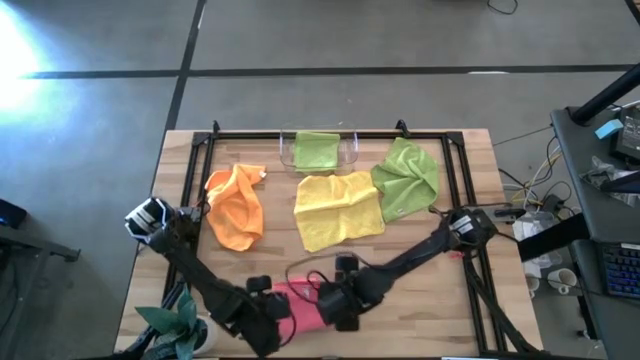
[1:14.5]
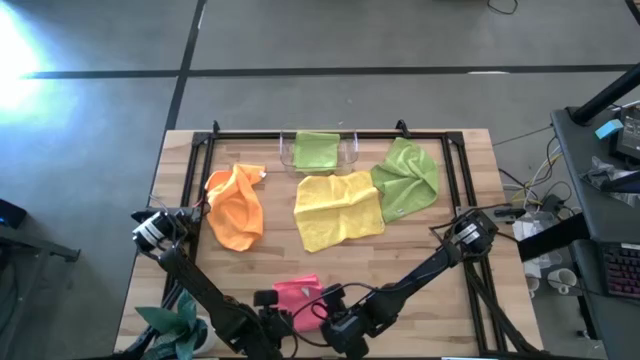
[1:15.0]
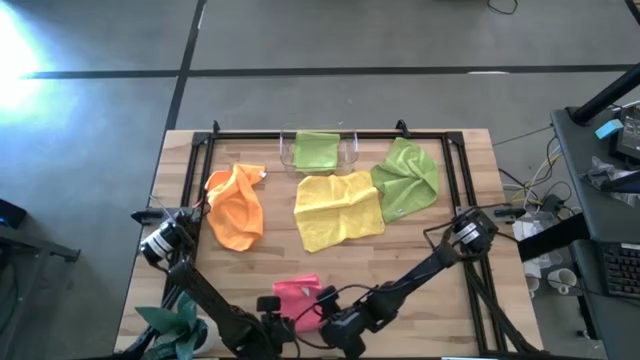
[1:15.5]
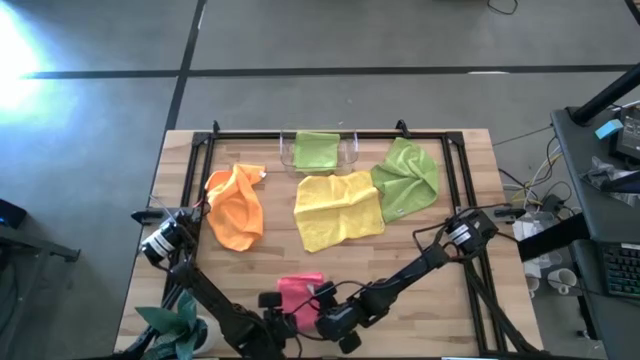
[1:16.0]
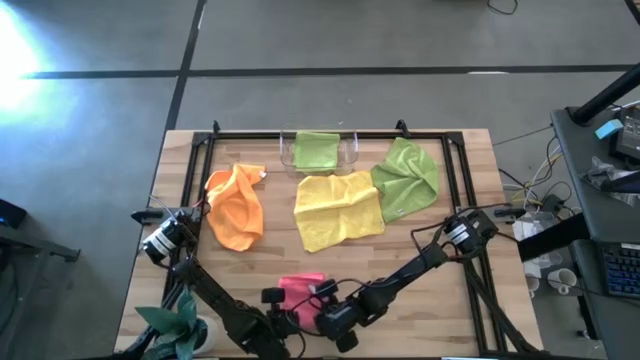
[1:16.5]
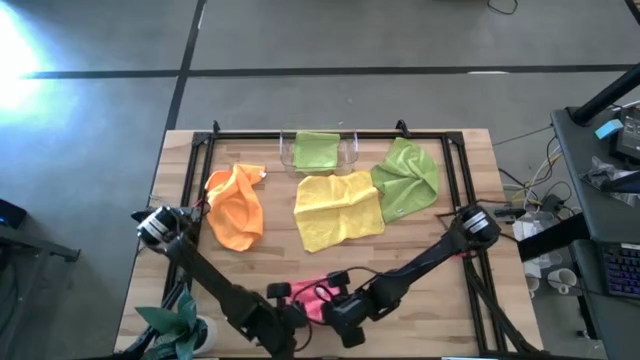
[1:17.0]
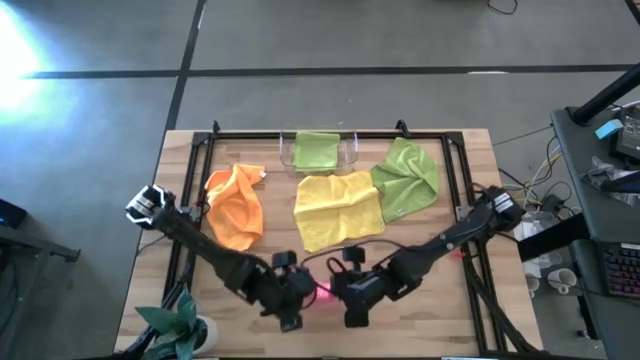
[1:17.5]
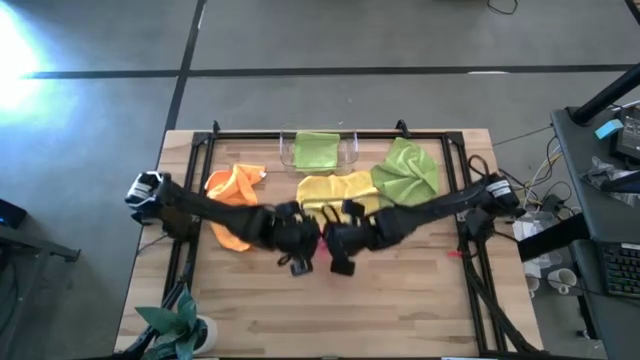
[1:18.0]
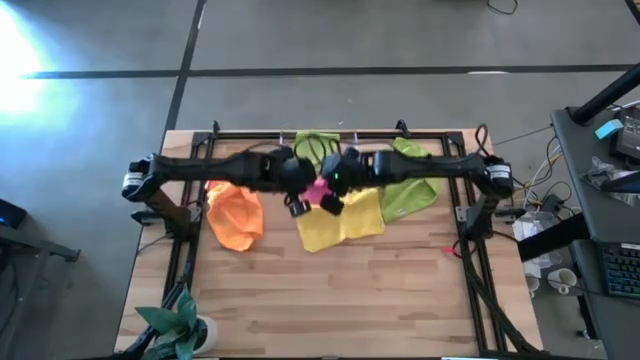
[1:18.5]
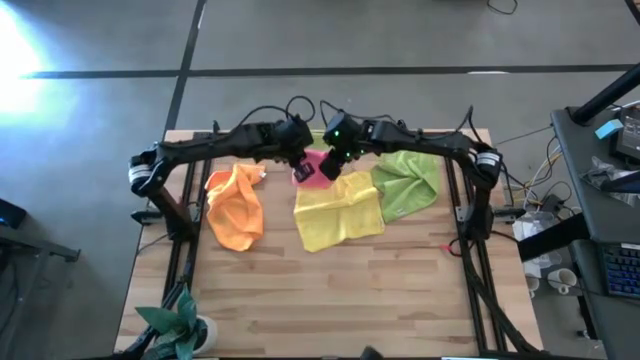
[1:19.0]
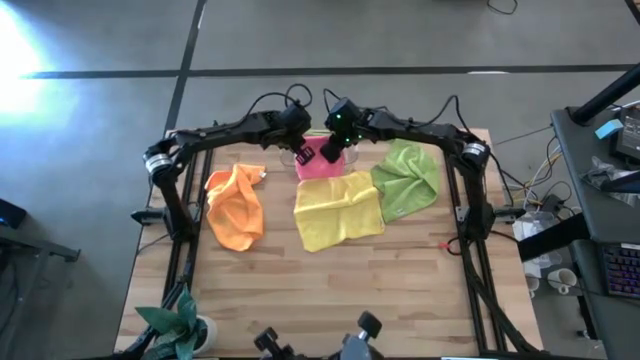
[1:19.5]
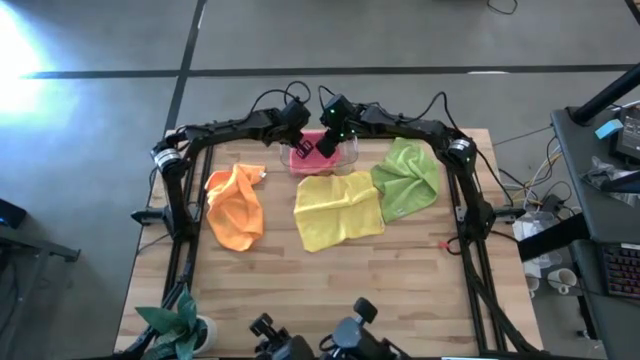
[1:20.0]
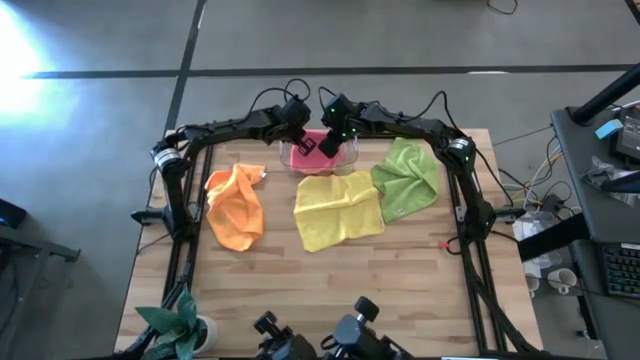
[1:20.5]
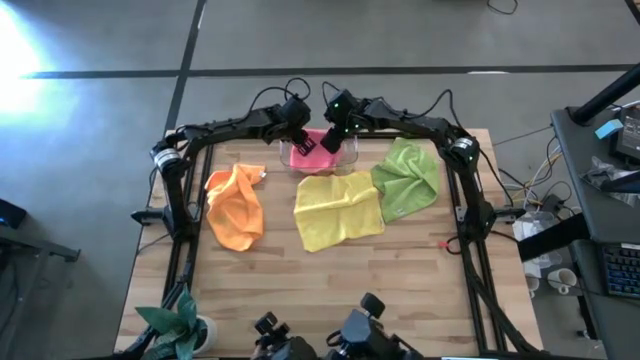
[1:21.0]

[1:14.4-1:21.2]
Task: Fold microfiber towels
Put the folded pink microfiber cloth into the transparent bin

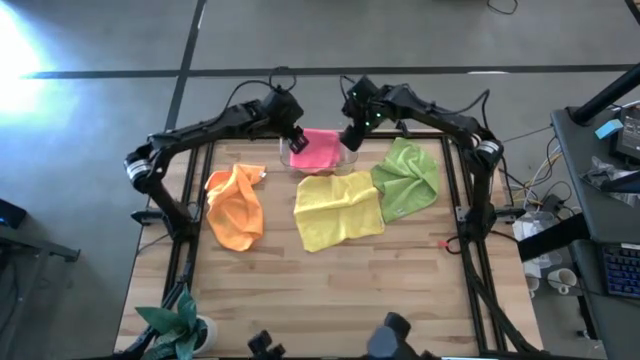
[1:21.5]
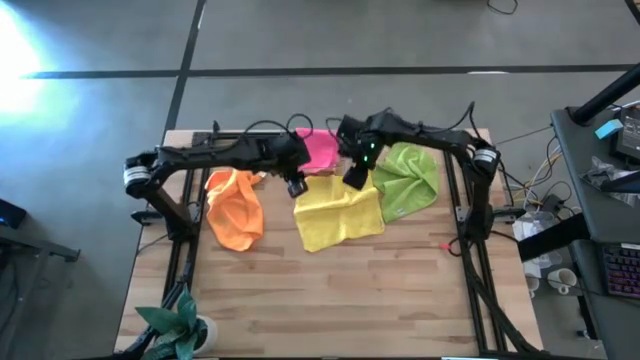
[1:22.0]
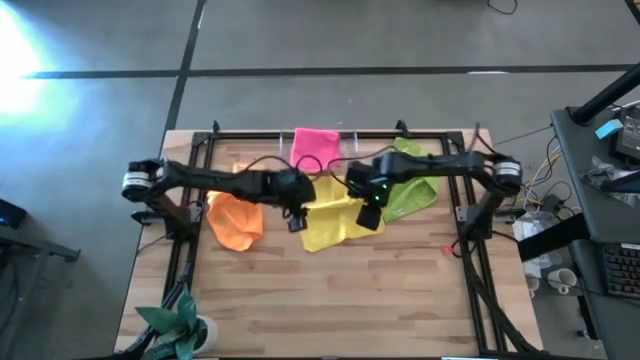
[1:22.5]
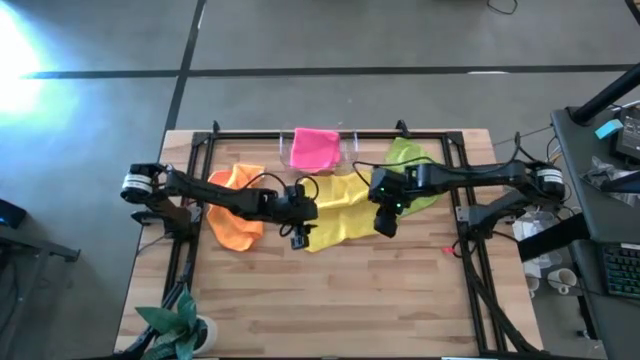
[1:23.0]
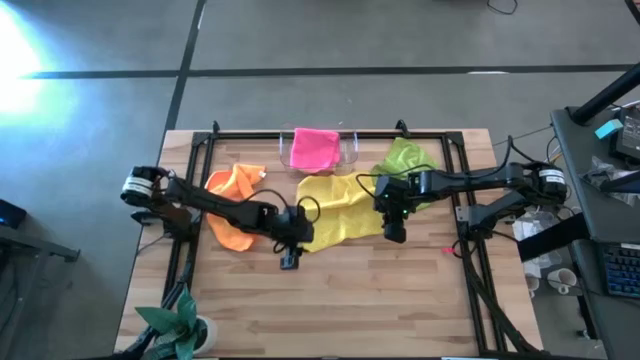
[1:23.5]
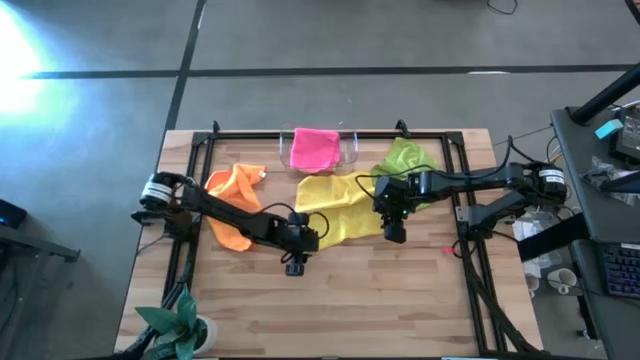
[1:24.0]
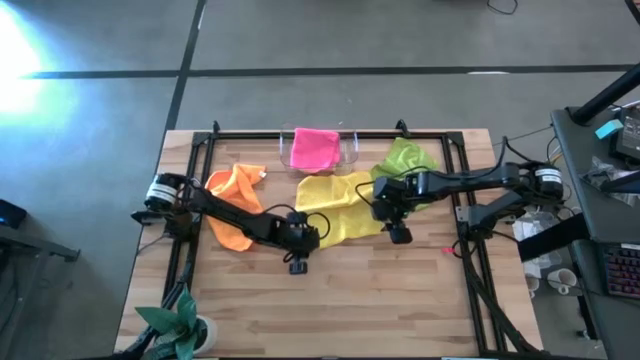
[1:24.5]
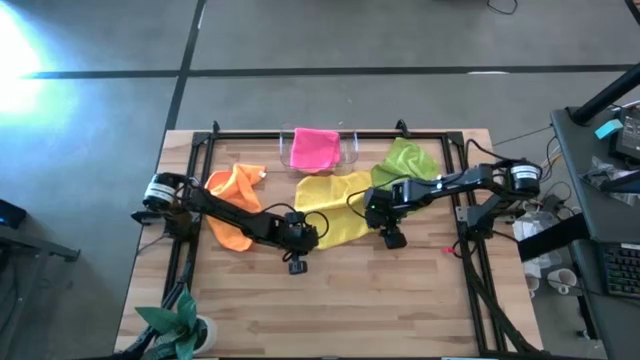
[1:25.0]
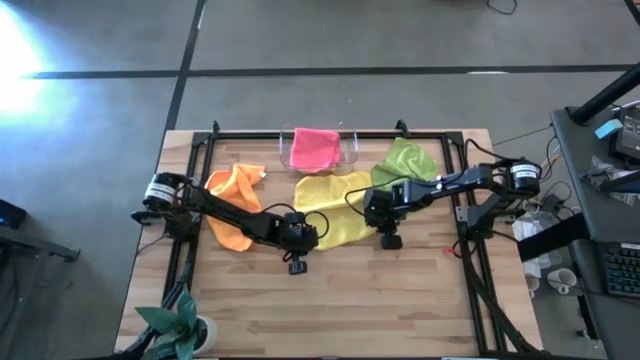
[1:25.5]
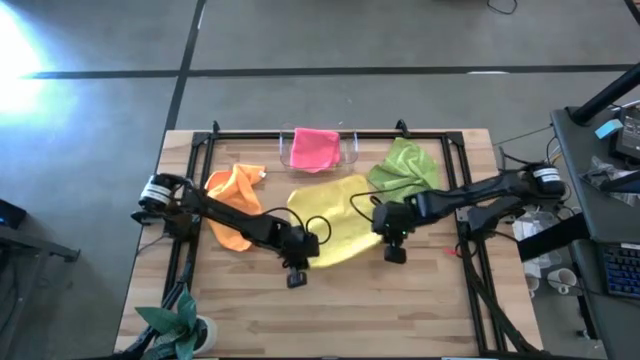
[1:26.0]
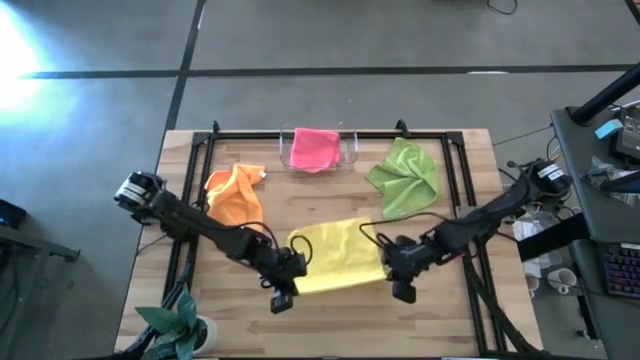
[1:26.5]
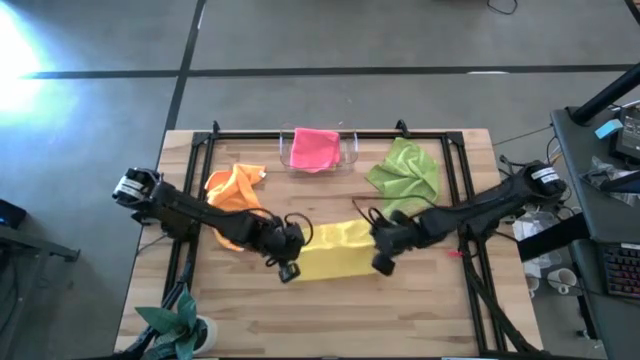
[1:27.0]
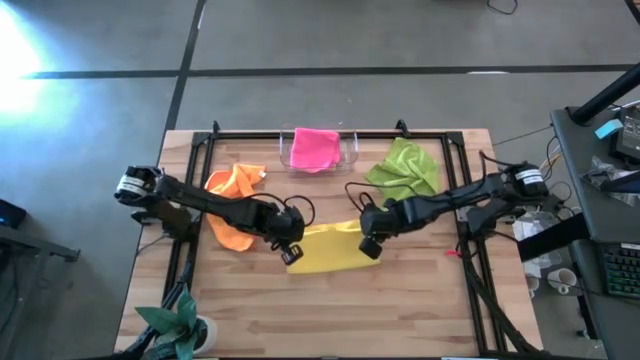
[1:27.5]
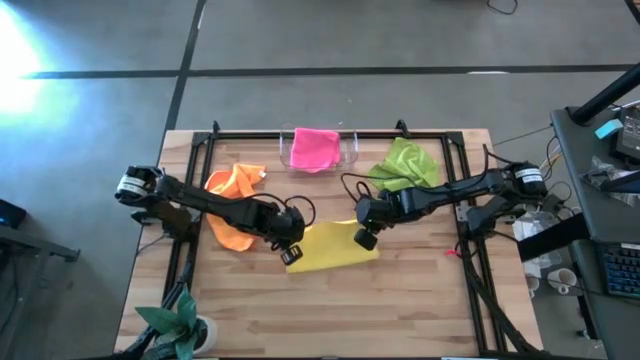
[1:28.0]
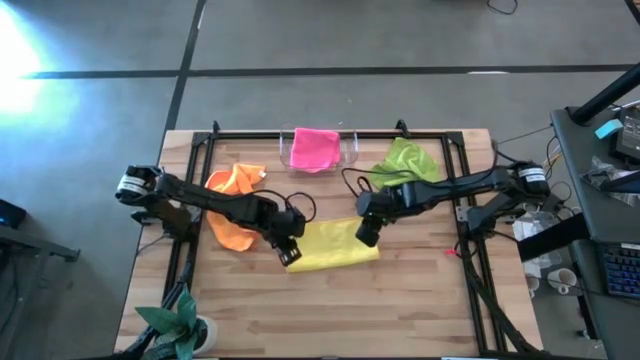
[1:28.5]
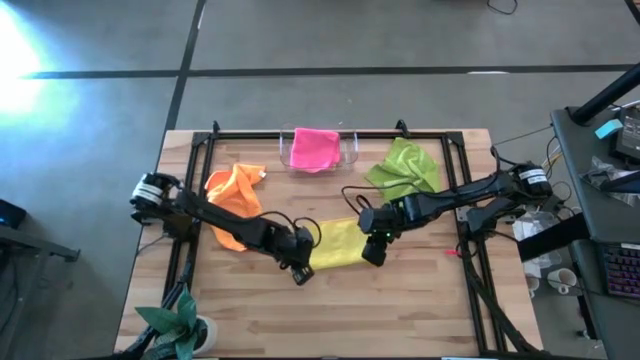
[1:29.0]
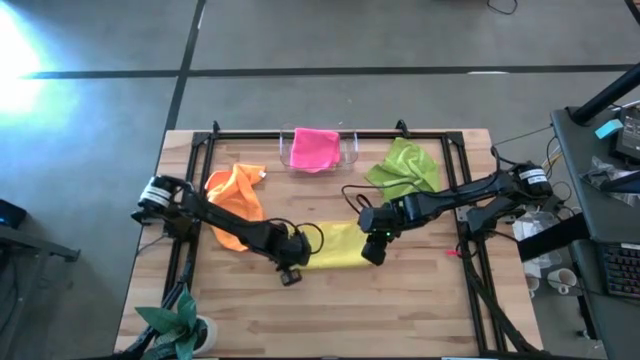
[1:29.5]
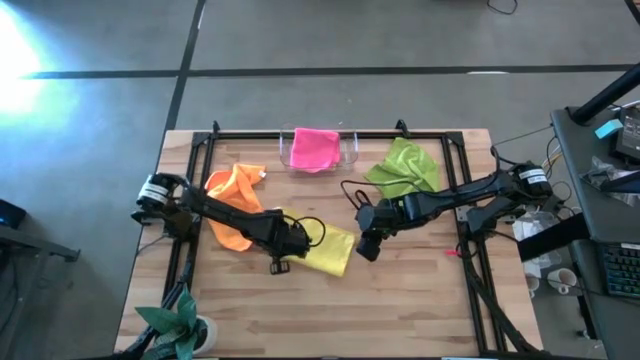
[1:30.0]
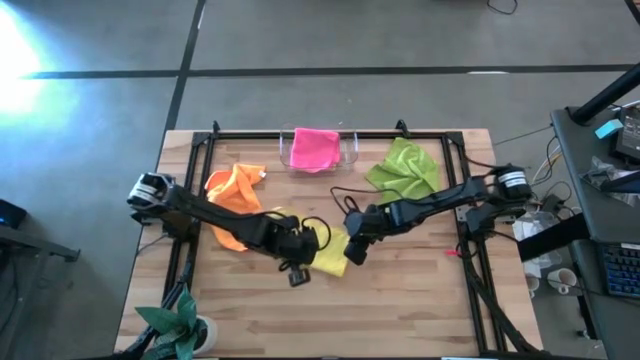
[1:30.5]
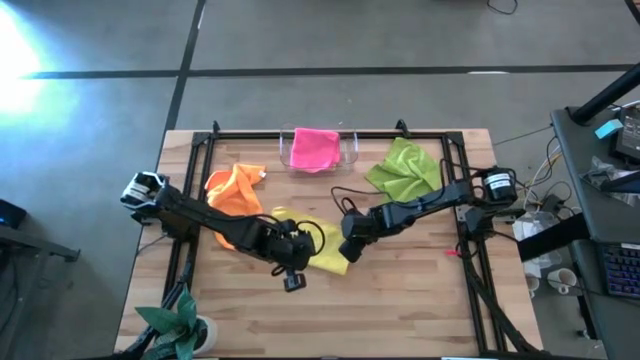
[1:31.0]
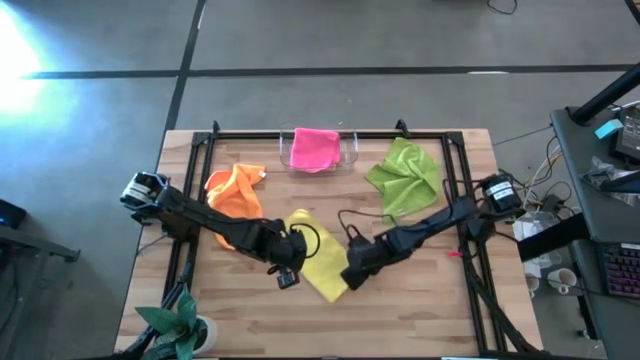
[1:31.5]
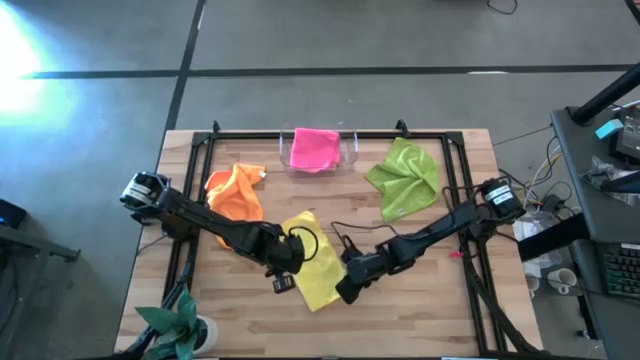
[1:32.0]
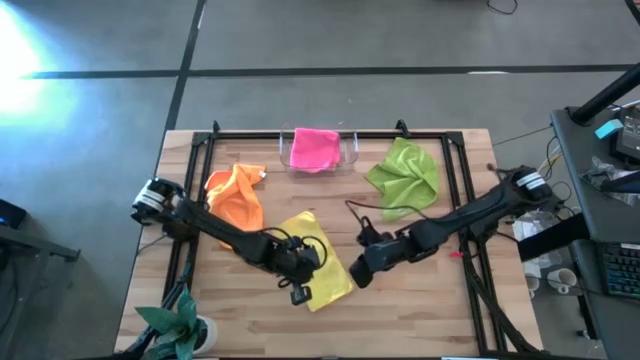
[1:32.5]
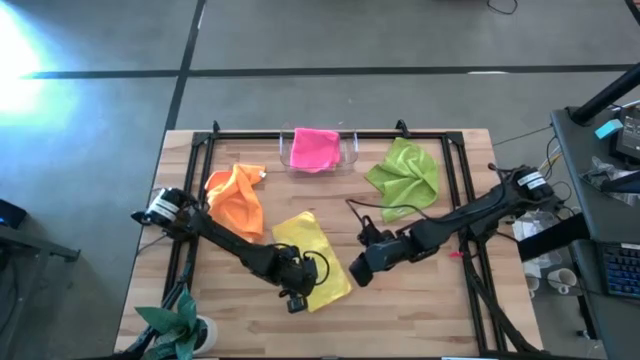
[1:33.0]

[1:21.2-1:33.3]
Fold the yellow microfiber cloth
